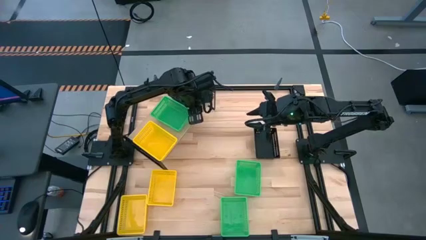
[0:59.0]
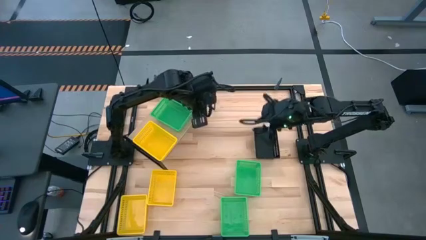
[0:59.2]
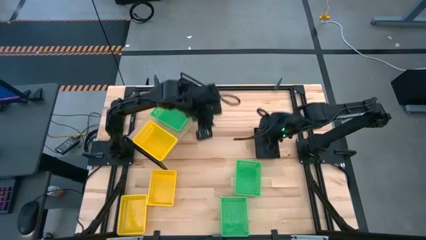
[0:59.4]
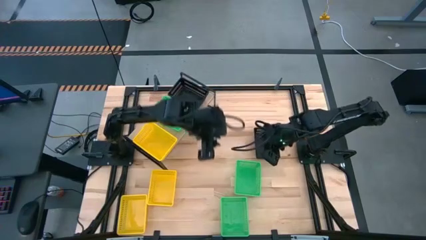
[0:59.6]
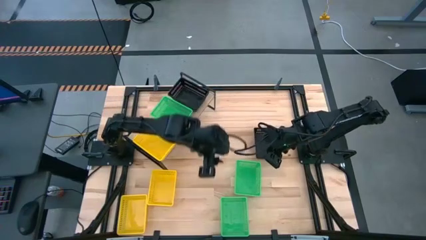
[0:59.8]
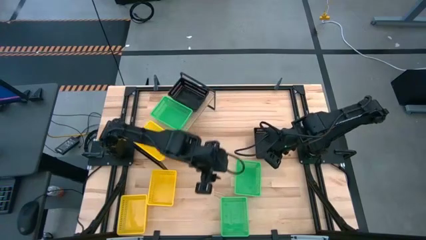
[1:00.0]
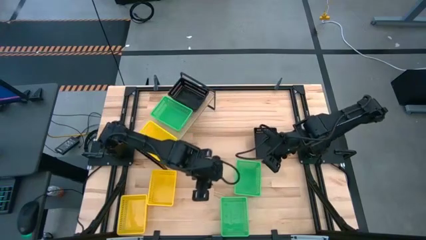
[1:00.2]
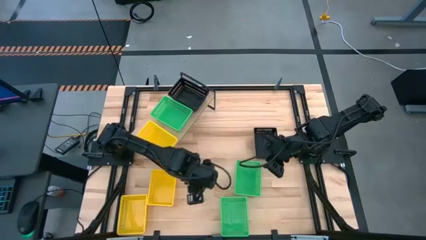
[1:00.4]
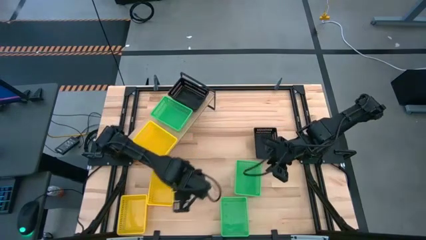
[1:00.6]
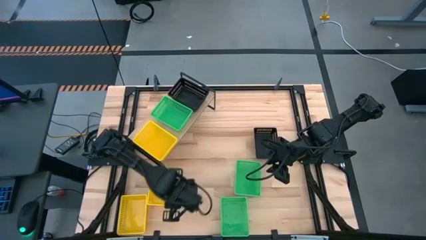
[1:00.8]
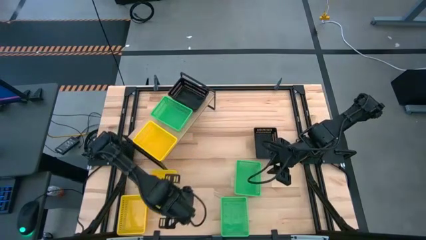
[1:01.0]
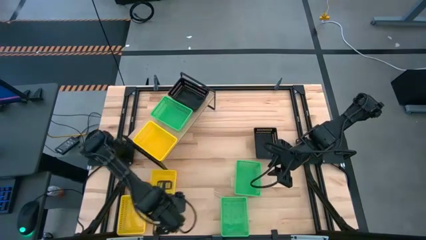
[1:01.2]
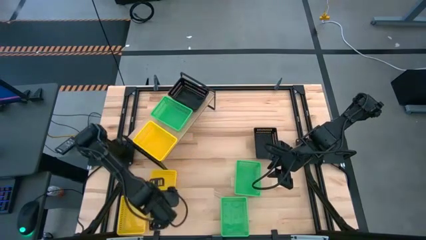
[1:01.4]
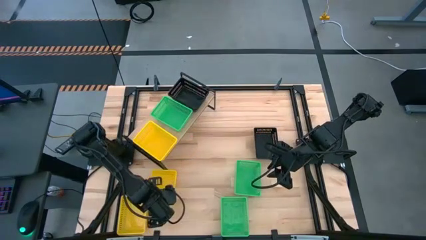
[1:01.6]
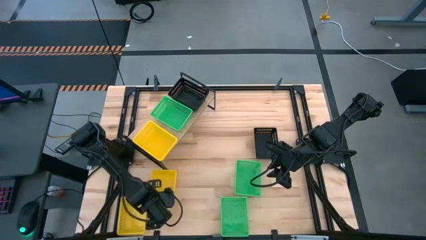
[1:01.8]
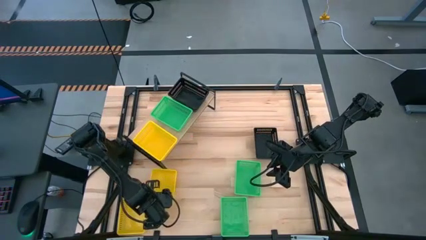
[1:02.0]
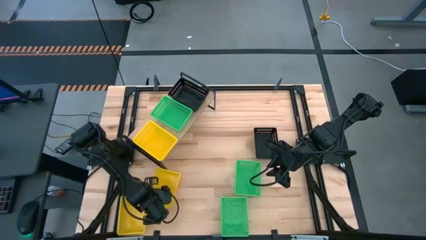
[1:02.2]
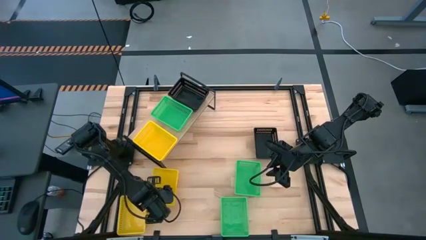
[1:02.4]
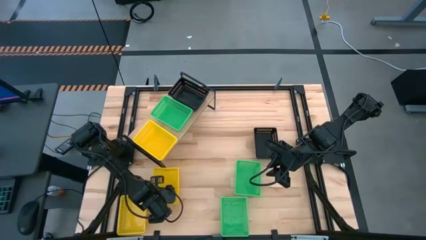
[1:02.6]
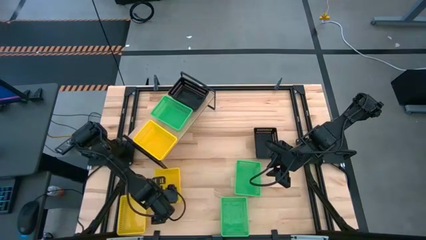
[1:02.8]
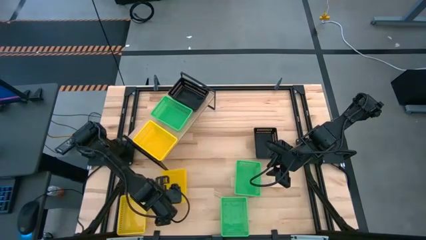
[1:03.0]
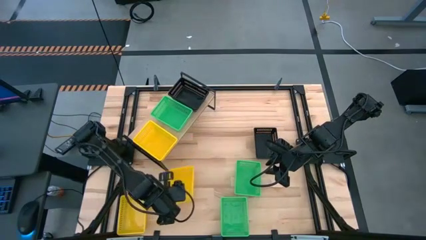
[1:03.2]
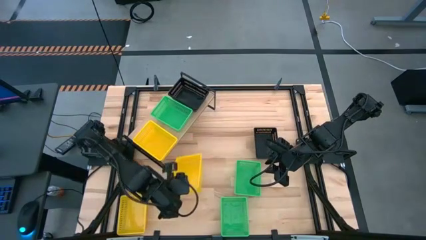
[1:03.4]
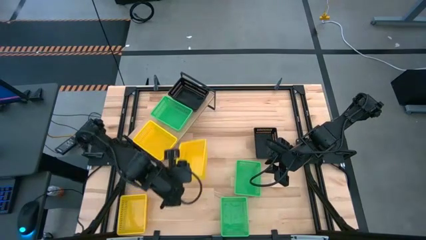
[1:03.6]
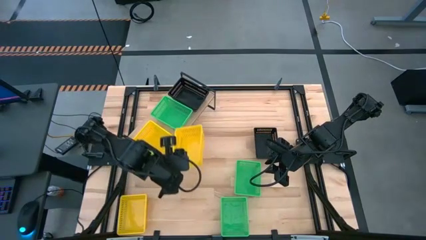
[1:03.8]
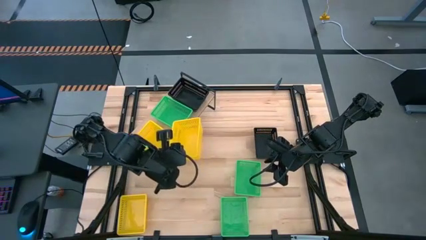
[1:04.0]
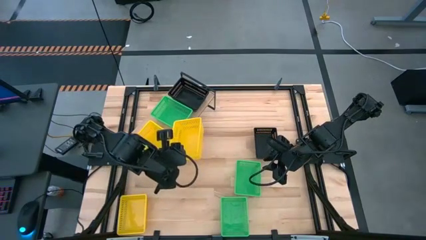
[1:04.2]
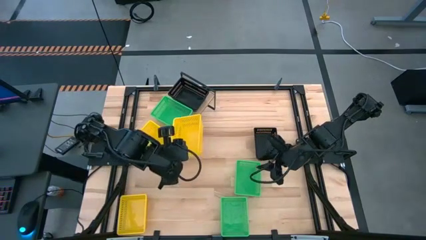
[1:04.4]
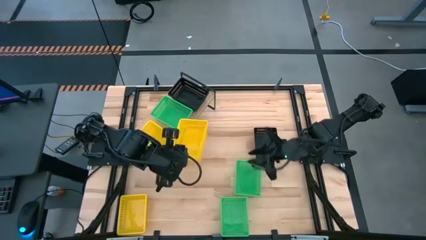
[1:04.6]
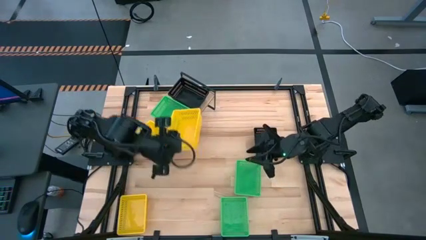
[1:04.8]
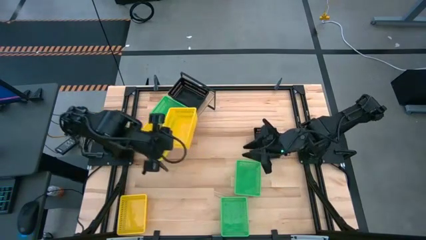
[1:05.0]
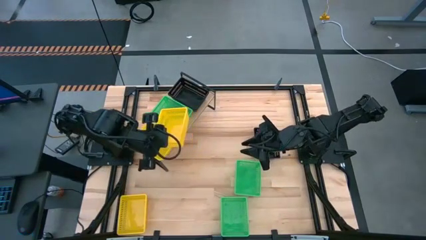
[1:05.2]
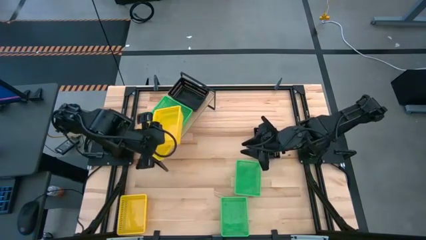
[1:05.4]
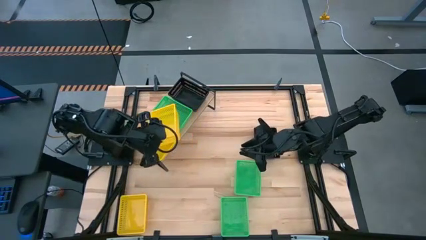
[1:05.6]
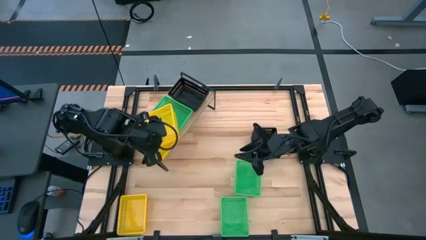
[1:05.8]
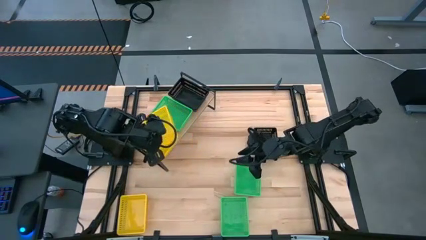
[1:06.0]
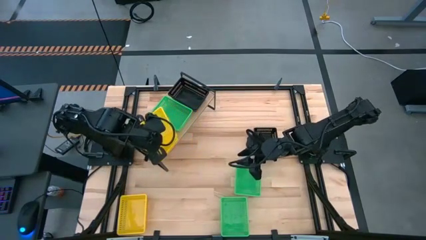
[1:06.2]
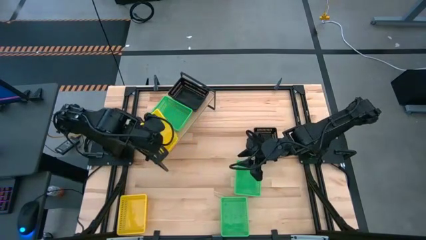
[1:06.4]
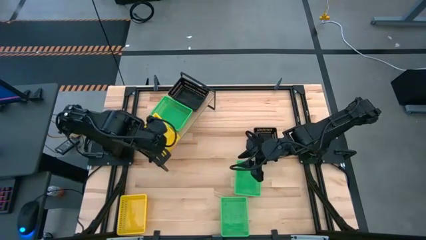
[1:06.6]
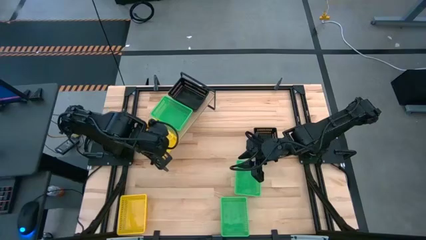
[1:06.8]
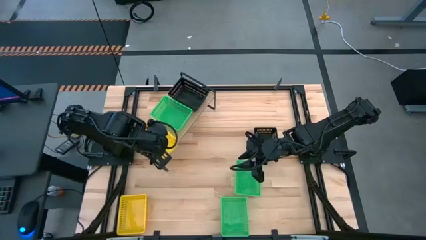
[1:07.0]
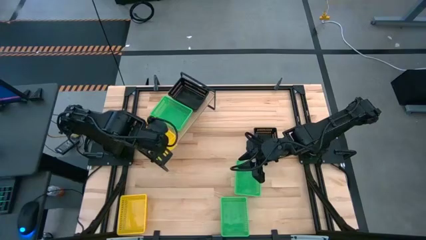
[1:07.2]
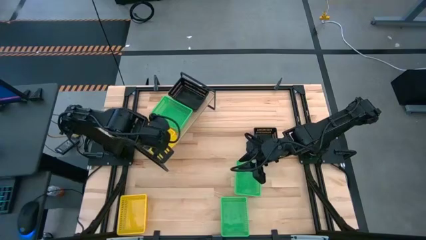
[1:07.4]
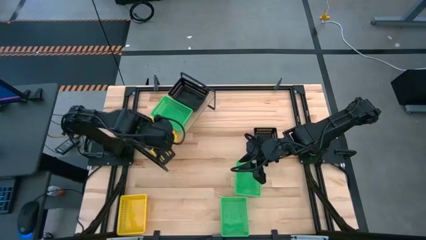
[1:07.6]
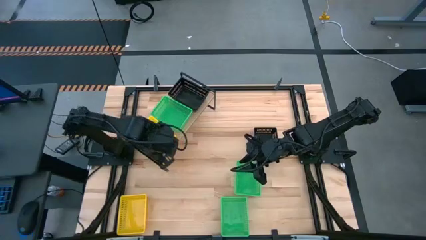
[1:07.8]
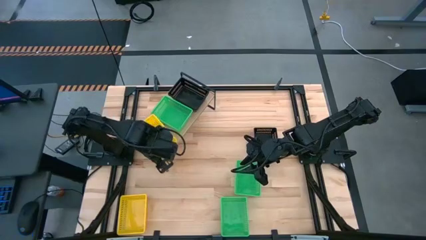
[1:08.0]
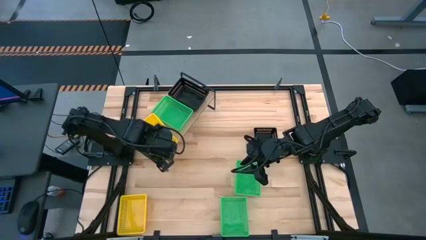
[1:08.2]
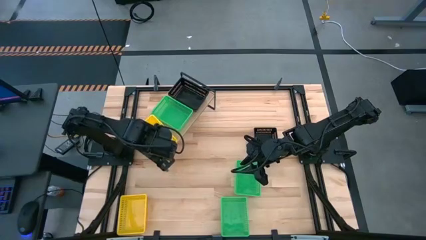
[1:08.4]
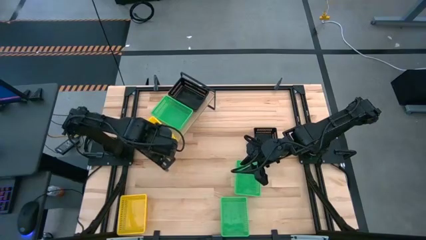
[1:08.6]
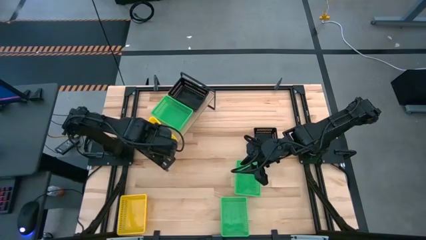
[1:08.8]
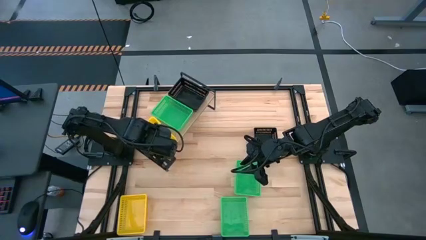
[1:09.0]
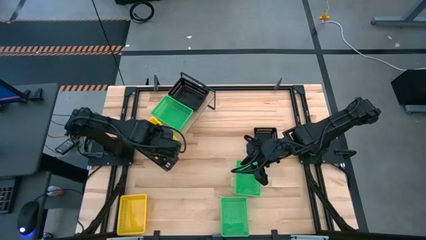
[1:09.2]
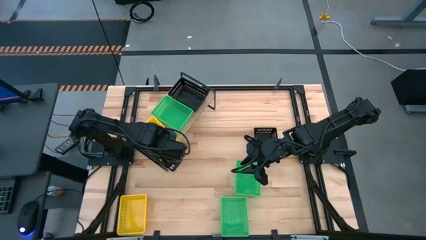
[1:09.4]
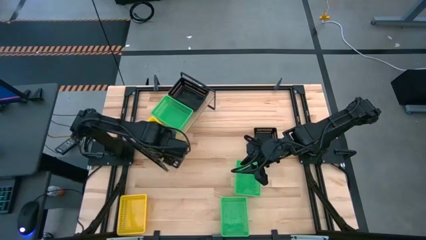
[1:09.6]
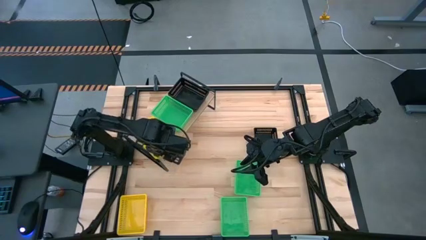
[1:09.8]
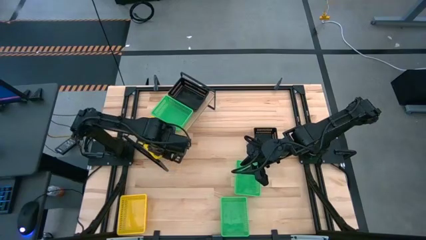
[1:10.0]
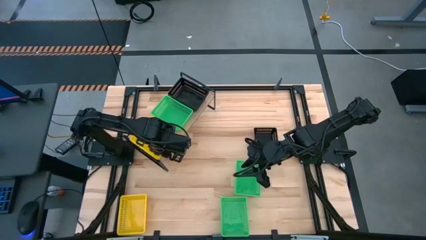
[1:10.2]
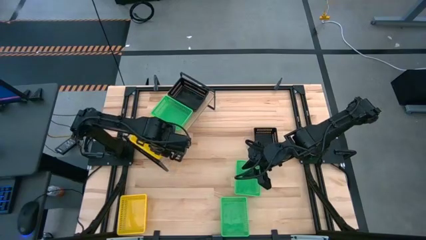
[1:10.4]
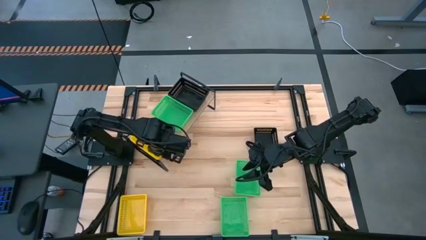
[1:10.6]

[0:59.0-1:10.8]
Task: Stack baskets on shelf by color
Stack the top yellow bin on top of the other yellow bin on the shelf

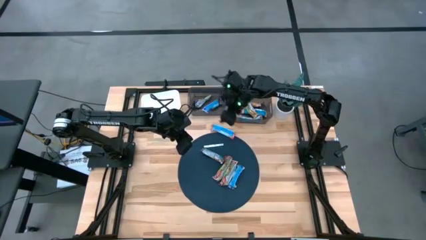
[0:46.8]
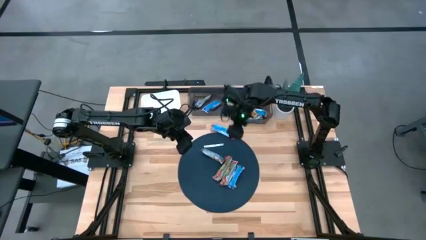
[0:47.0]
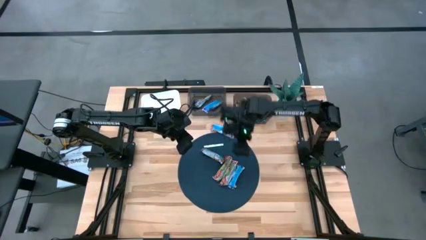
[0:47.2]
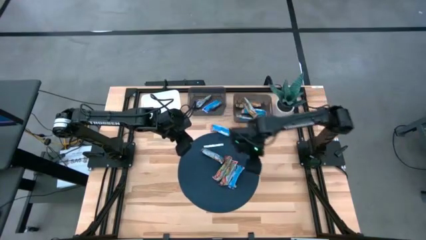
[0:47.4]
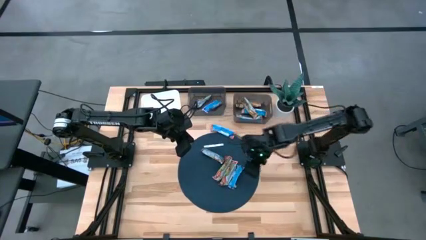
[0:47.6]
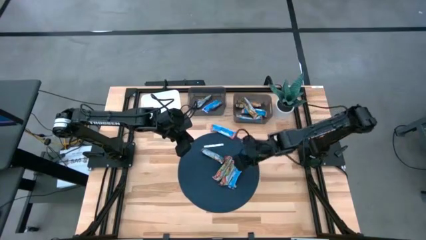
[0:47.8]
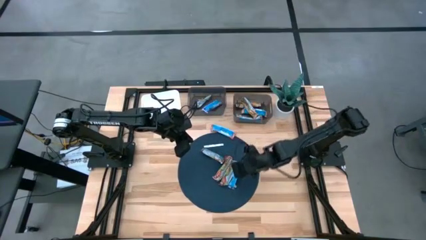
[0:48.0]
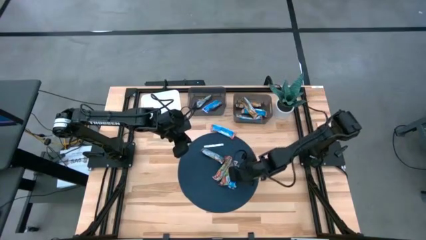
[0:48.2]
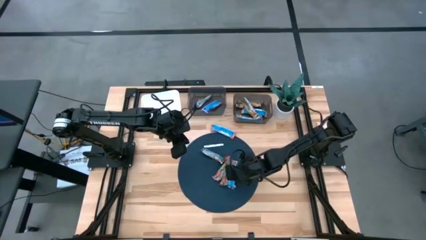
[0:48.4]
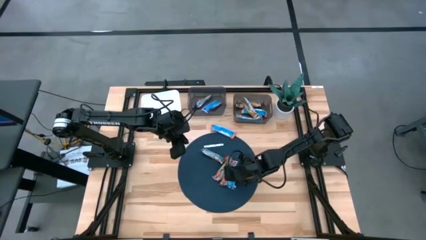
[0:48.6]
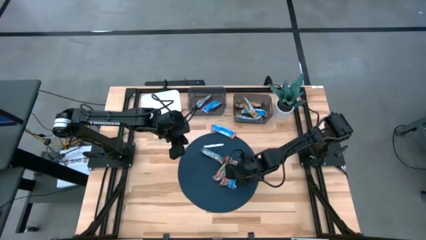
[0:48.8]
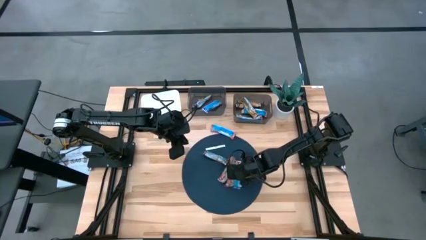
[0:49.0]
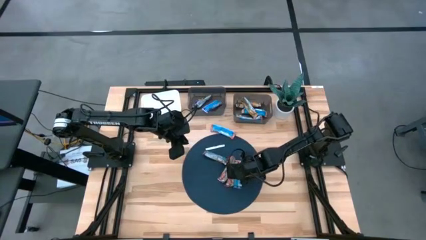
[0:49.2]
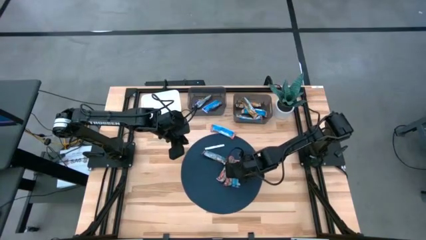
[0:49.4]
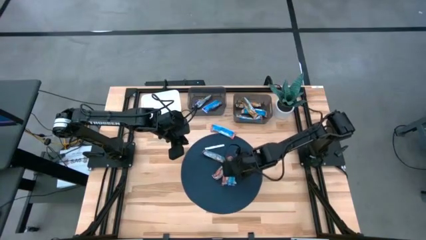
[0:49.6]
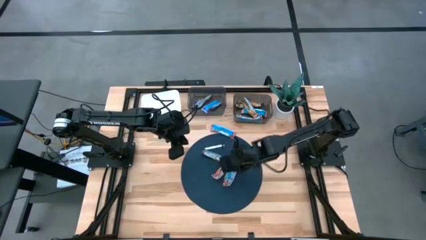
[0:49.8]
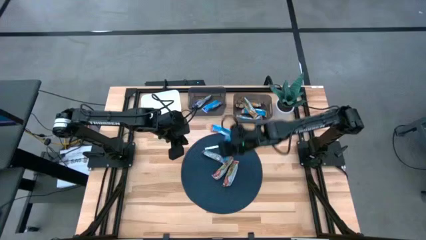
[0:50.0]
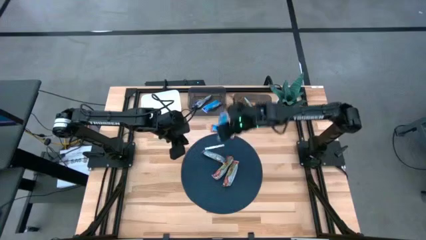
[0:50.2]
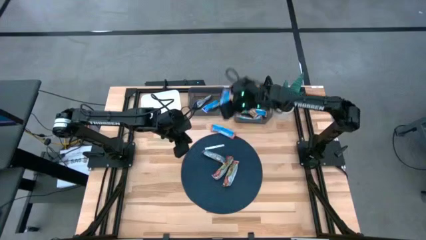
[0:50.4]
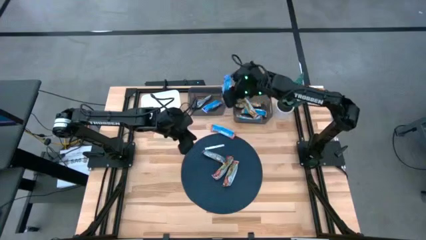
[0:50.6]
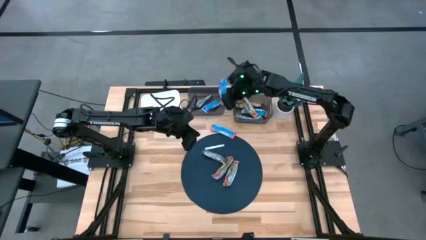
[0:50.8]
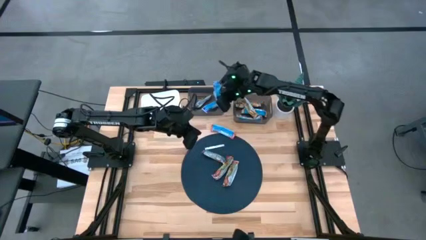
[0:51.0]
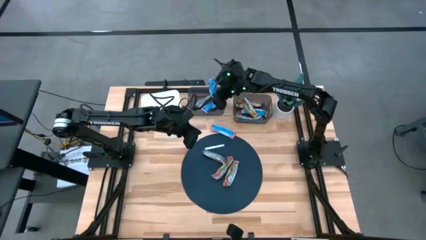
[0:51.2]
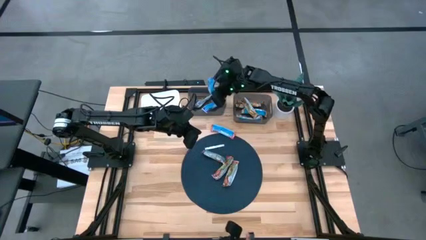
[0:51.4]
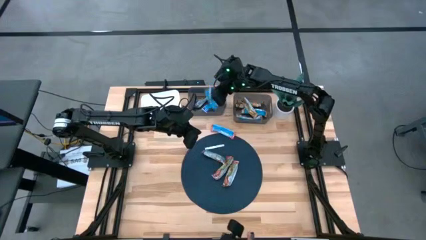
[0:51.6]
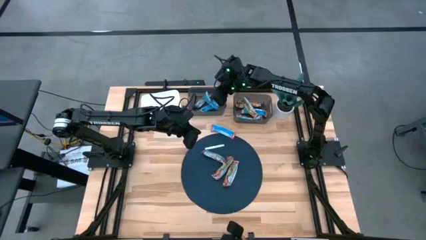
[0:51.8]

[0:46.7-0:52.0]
Task: Pick and place Granola Bars by type
Put the blue granola bar into the middle black bin
